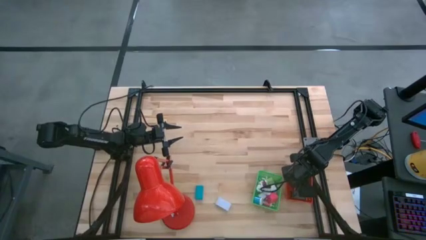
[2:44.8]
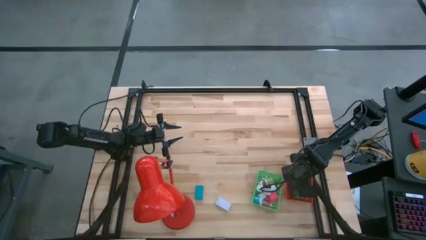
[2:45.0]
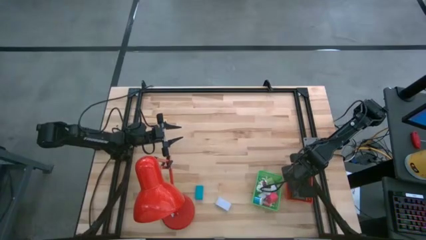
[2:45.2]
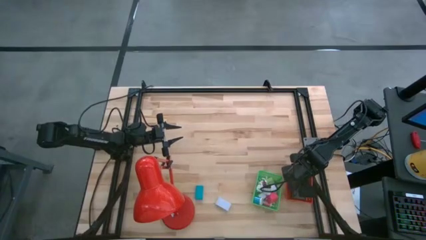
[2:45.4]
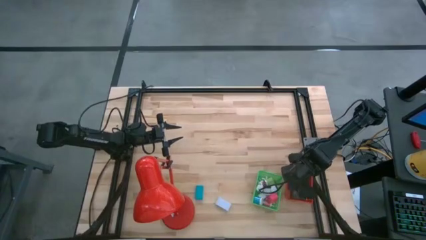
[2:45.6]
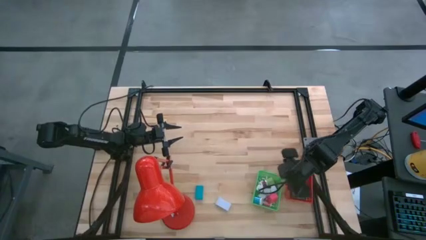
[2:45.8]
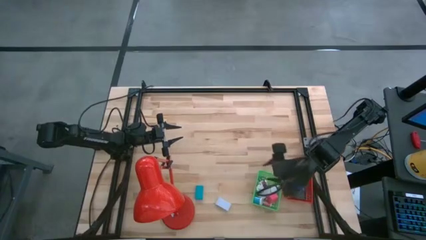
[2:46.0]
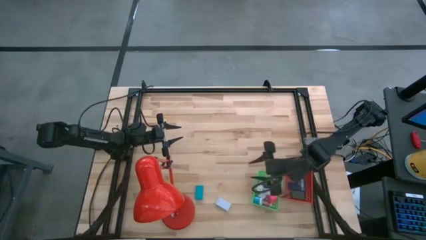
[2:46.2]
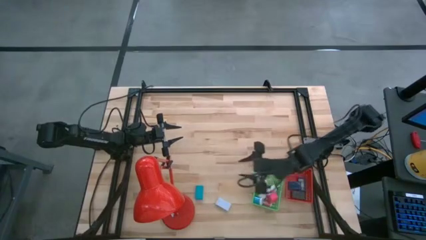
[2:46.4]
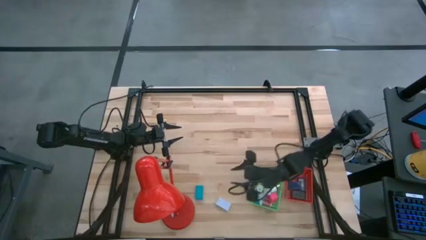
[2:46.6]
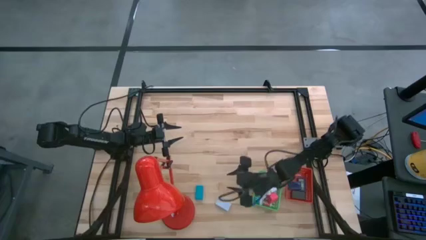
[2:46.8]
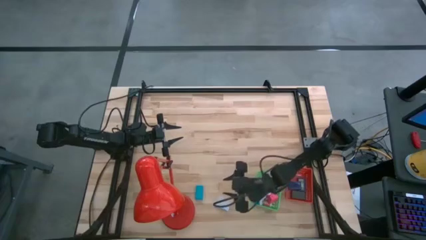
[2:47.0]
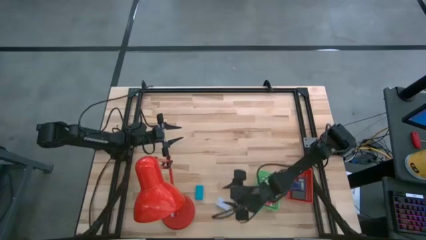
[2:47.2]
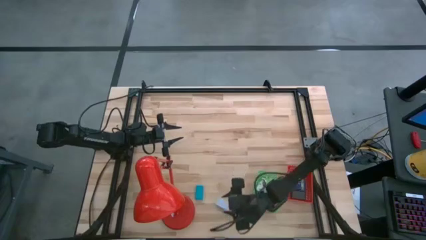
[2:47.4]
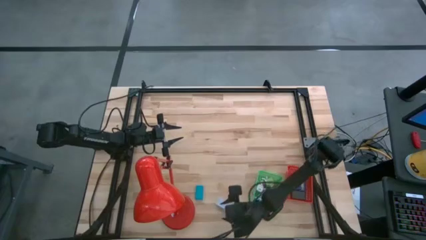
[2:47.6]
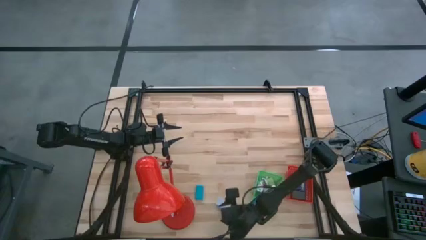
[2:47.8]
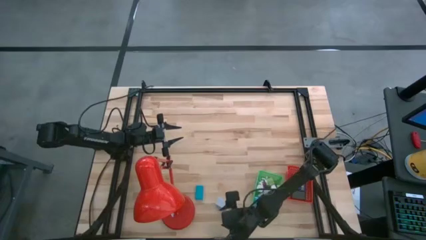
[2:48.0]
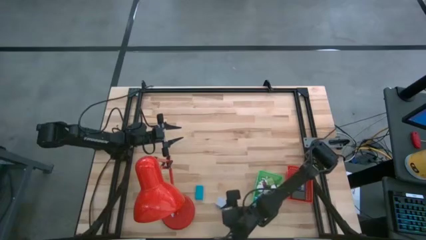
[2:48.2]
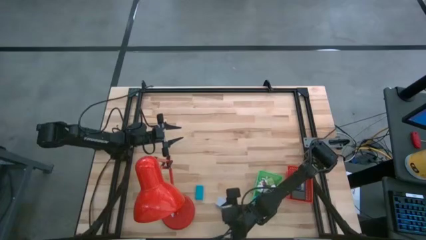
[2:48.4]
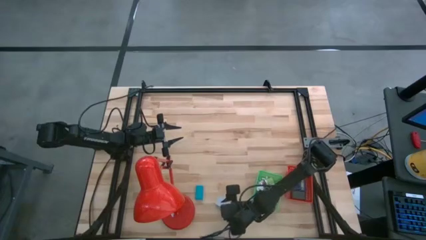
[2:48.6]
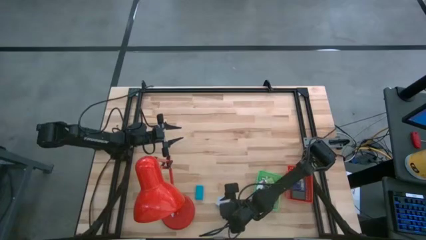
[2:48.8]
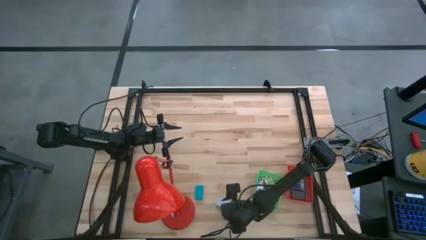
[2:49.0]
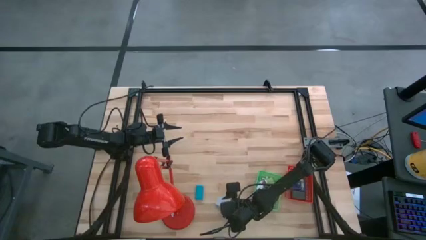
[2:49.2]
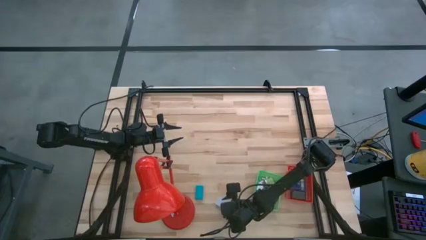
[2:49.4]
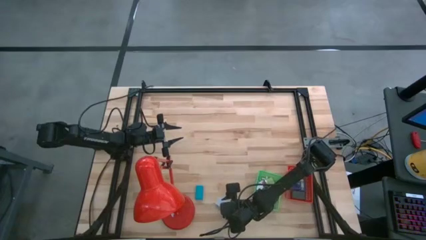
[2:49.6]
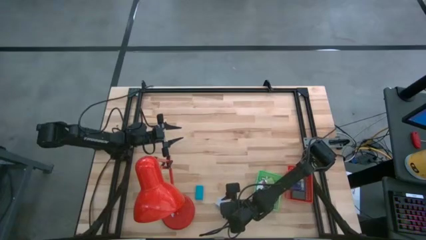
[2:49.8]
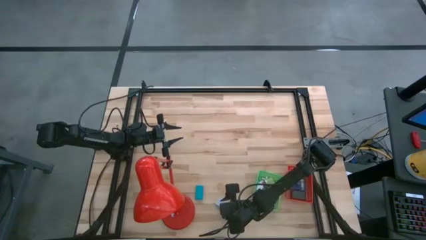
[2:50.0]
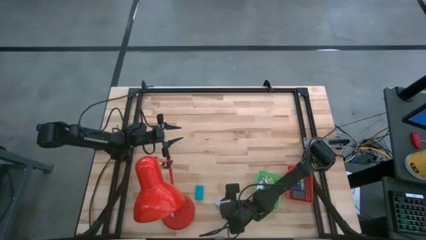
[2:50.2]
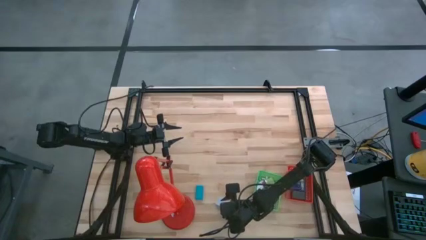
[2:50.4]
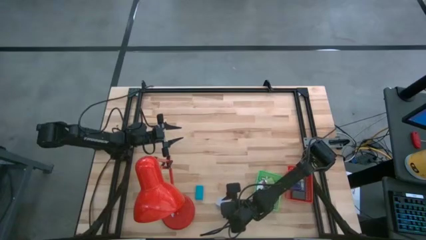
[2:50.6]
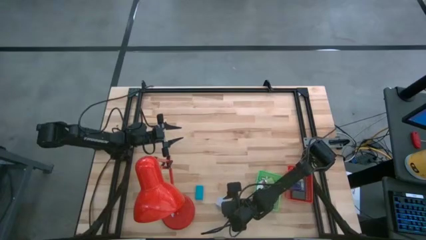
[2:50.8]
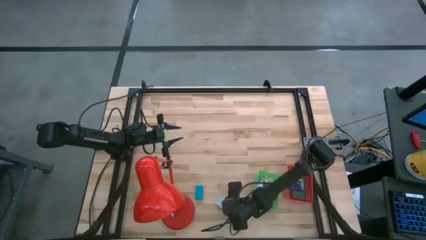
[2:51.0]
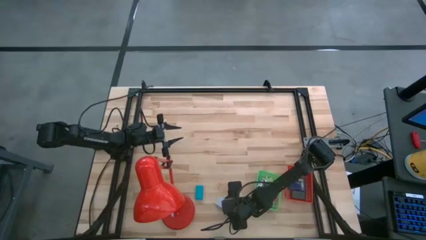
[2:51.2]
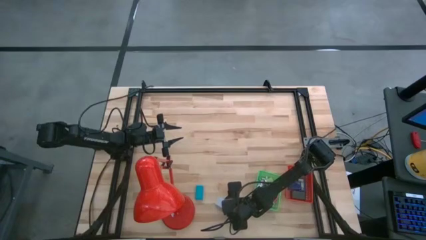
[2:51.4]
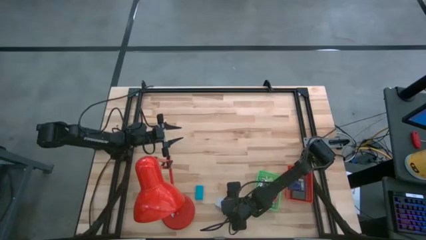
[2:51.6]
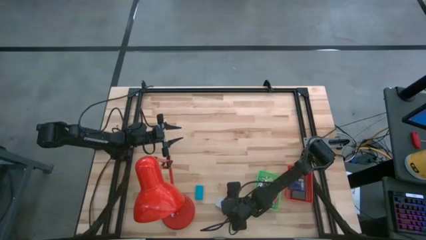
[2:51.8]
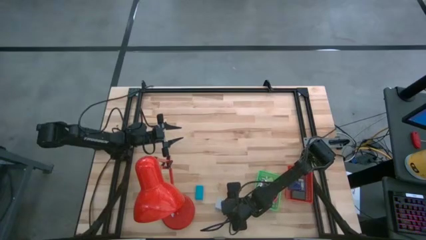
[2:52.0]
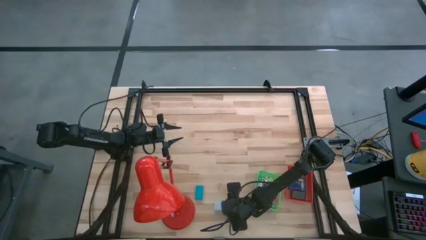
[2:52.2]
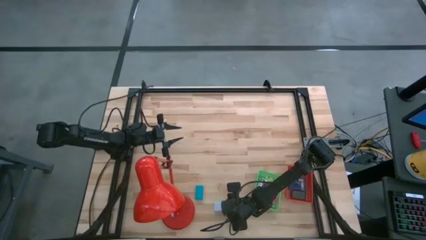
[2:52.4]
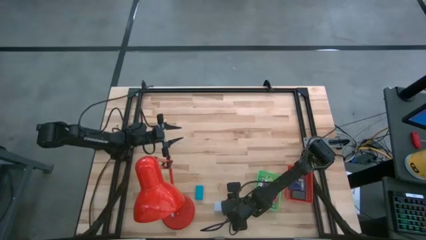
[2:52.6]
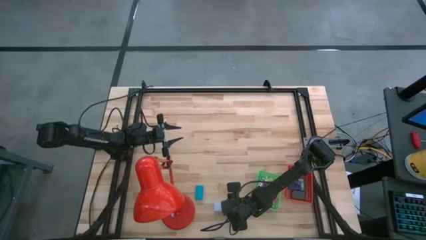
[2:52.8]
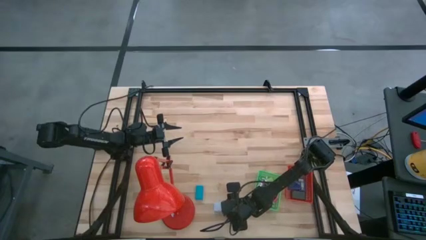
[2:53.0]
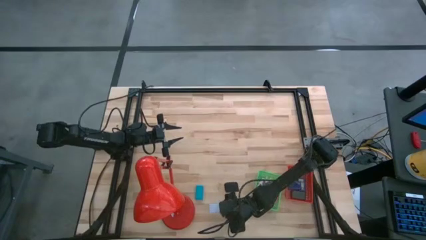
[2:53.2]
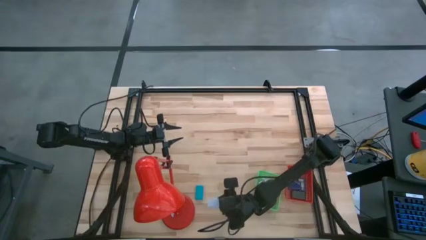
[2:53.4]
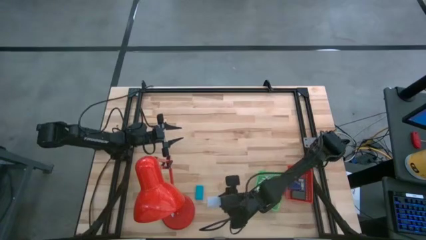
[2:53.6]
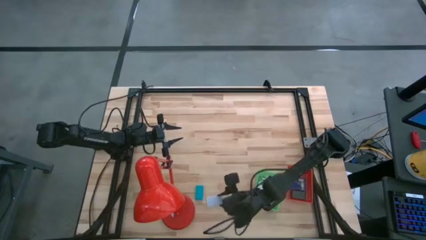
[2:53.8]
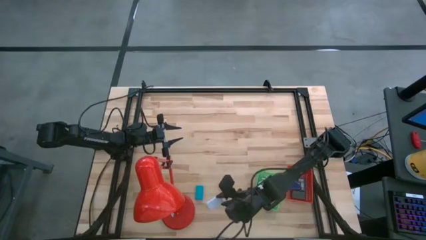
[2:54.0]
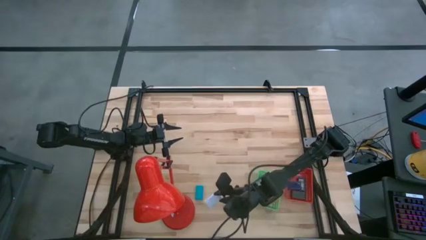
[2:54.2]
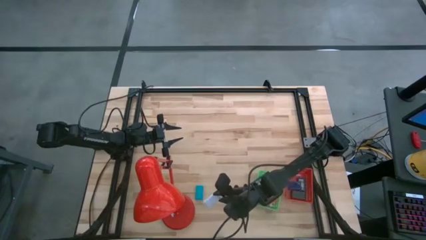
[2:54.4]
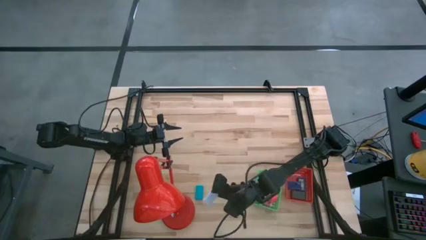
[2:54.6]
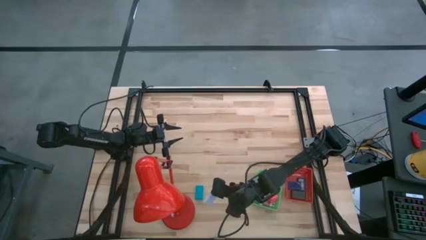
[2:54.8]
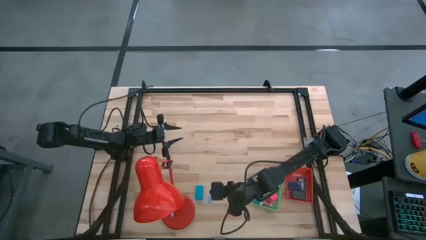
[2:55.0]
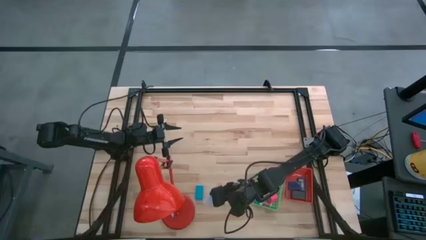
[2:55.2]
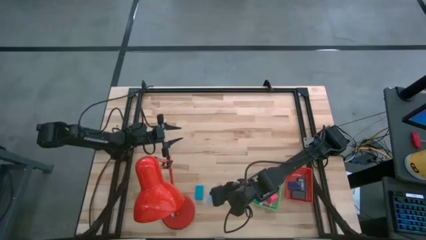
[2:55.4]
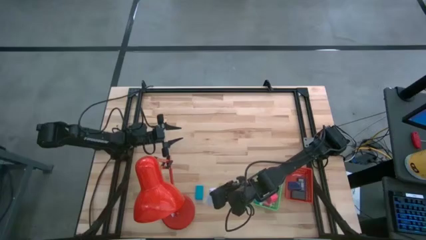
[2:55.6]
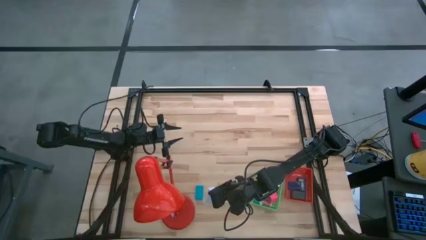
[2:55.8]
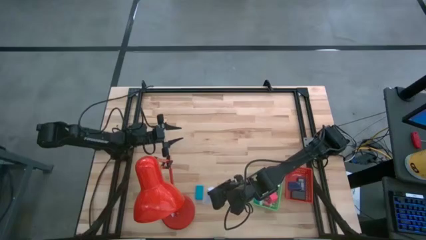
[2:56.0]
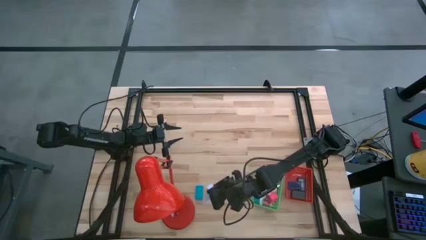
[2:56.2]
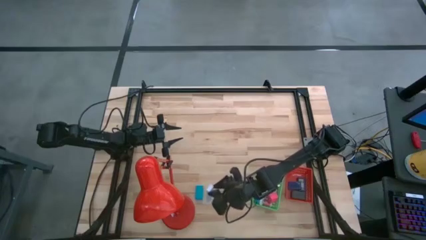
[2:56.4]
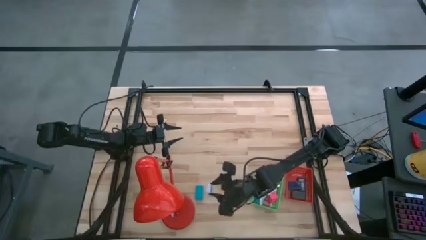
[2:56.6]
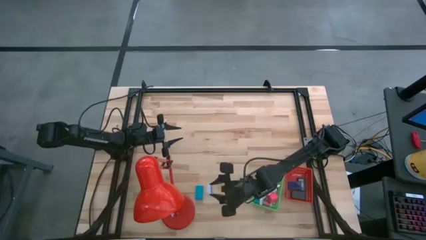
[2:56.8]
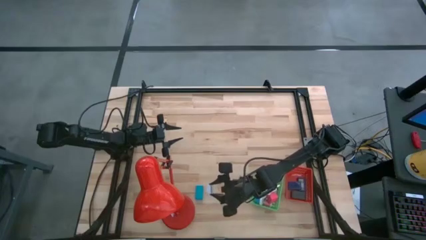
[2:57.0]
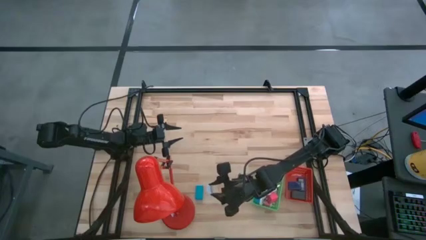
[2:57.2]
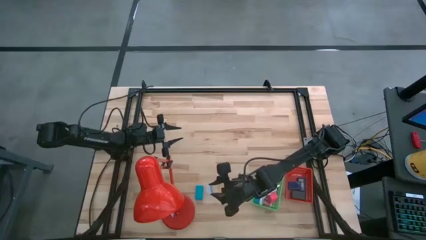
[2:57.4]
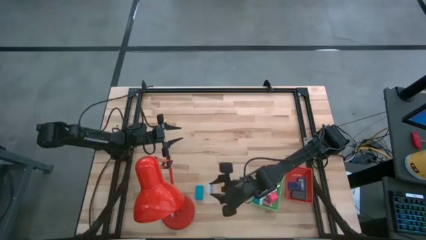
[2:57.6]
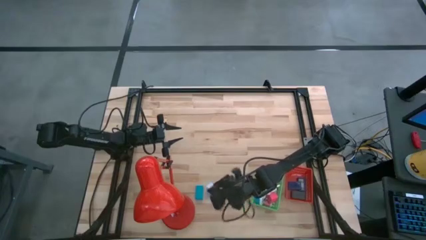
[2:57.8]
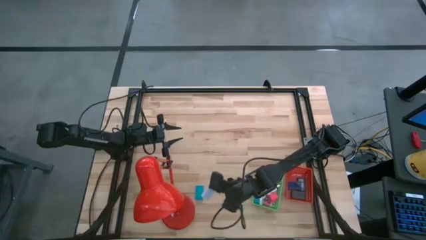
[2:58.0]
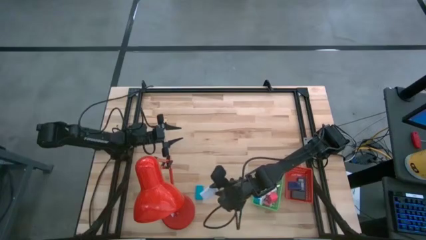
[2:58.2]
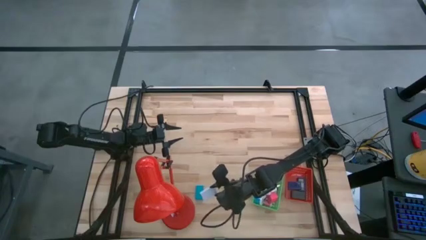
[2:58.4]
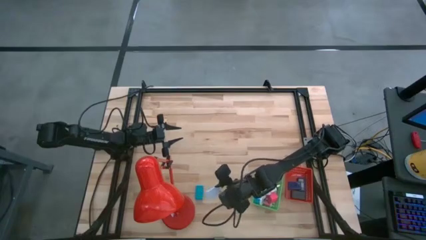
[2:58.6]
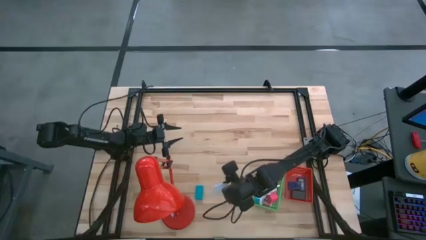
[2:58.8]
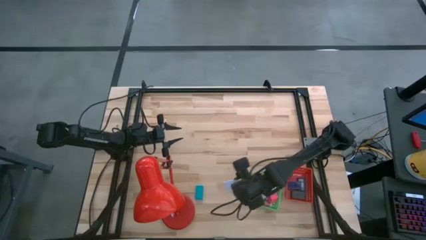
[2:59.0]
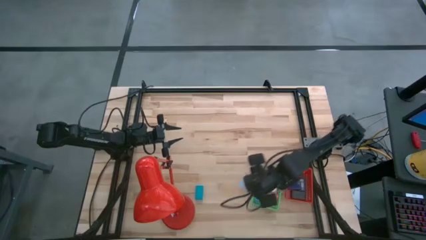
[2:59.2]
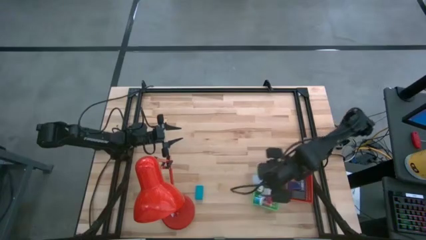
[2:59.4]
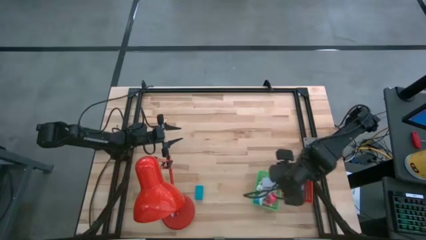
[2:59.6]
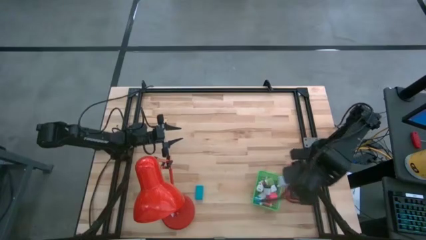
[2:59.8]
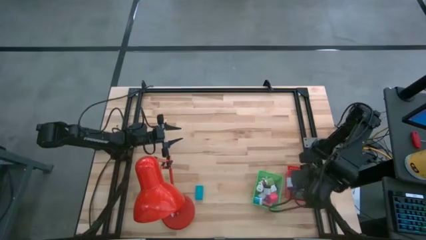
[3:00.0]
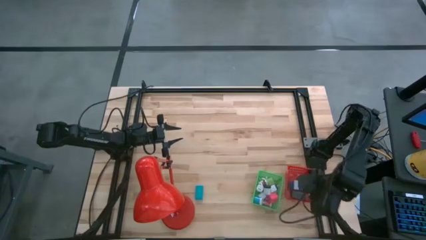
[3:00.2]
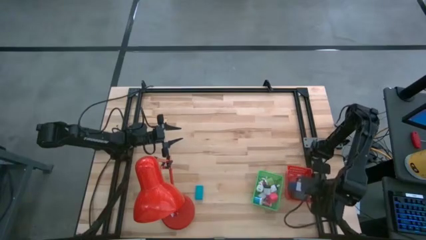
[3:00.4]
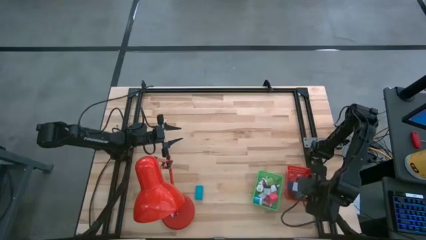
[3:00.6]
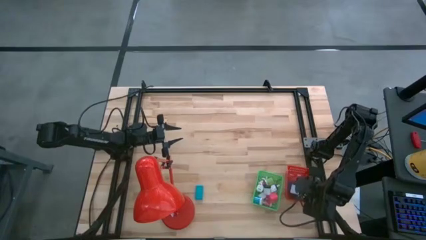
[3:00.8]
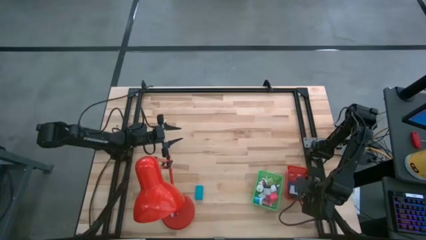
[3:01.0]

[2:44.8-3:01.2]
Task: Pick & Place Office items
Put the white digital clock into the red basket
